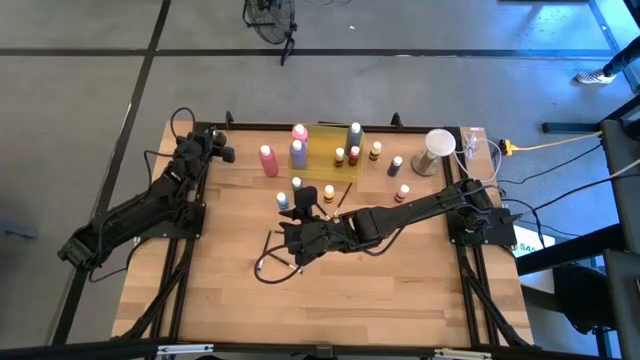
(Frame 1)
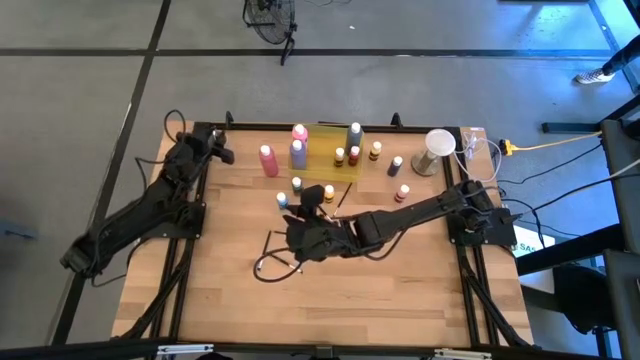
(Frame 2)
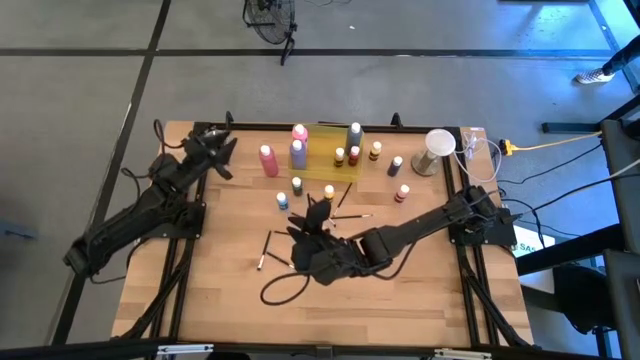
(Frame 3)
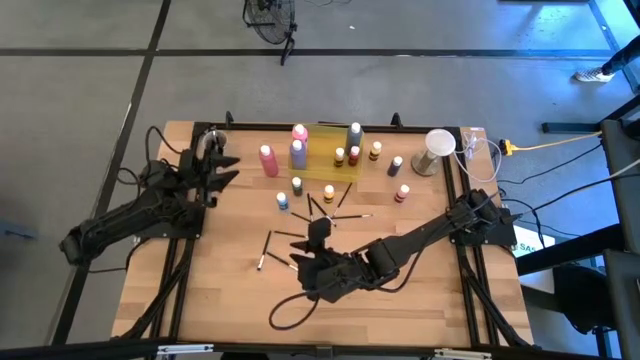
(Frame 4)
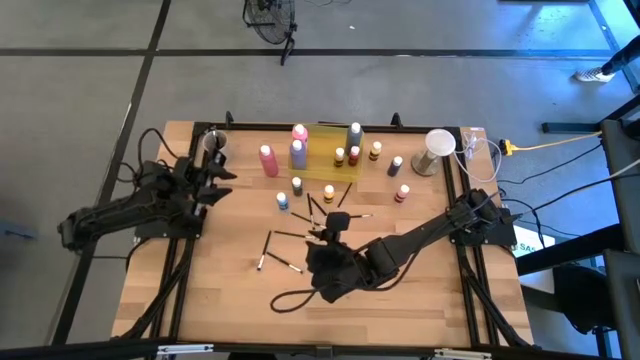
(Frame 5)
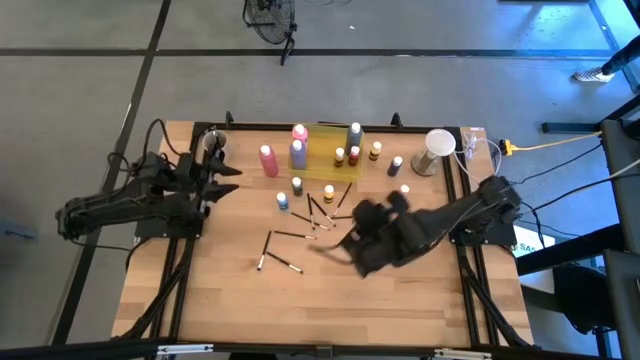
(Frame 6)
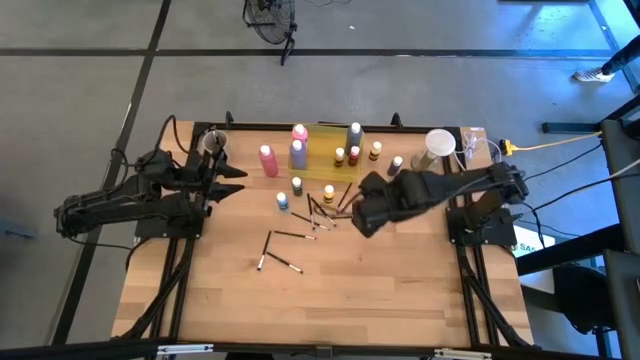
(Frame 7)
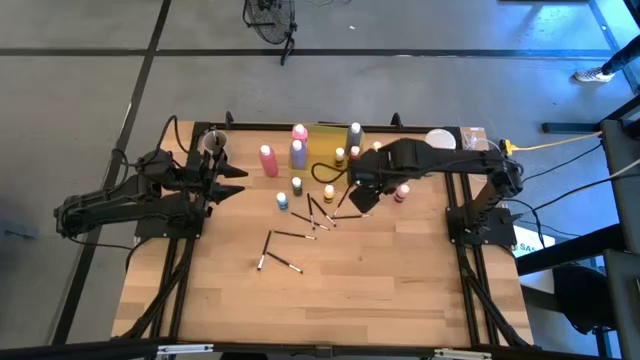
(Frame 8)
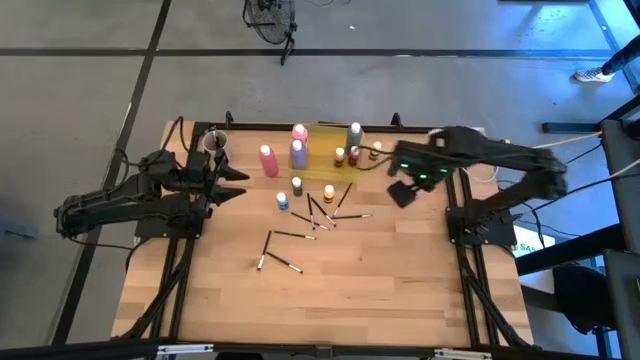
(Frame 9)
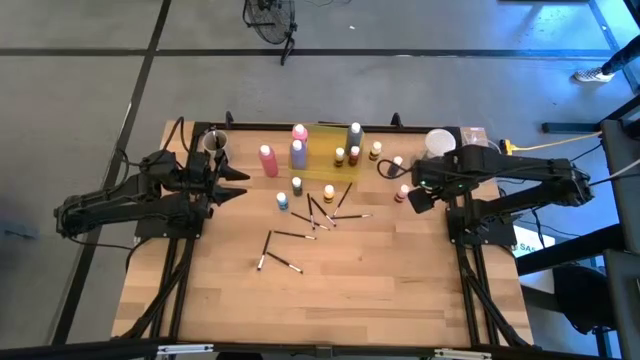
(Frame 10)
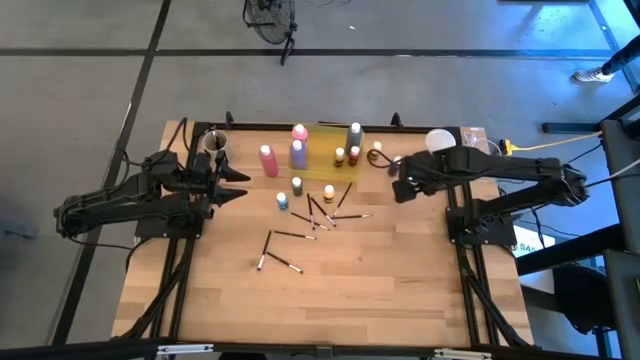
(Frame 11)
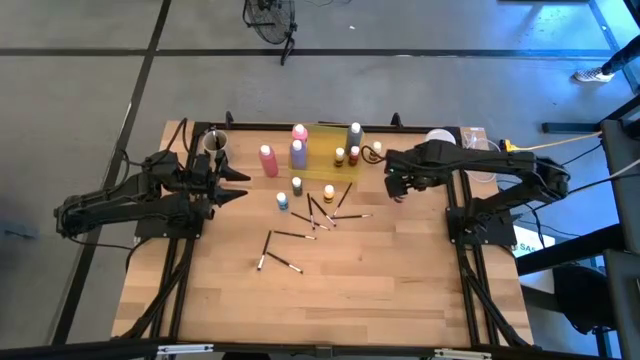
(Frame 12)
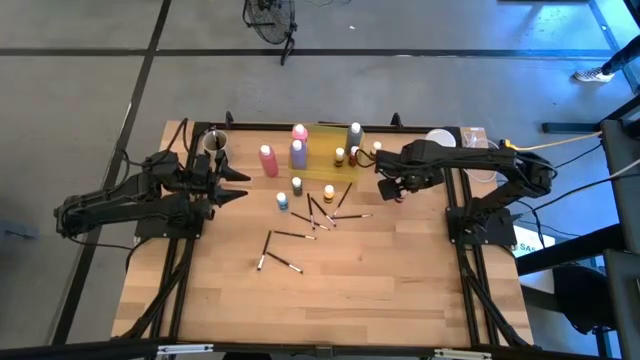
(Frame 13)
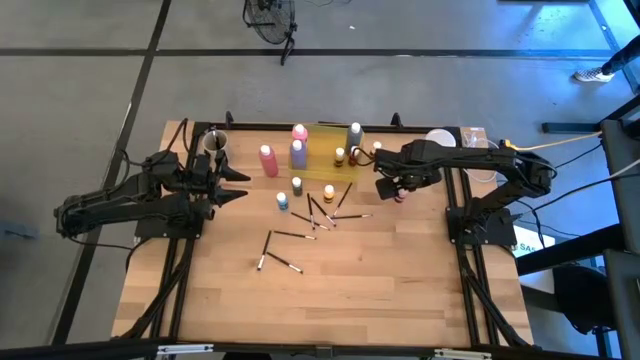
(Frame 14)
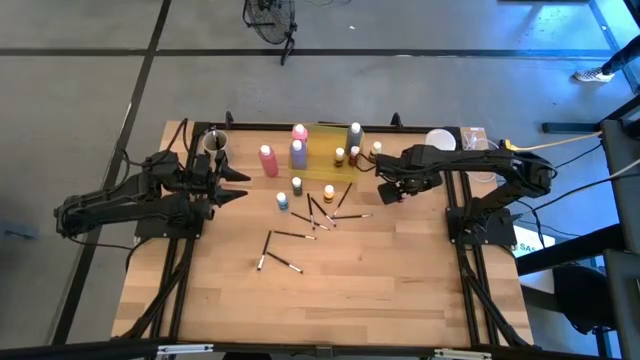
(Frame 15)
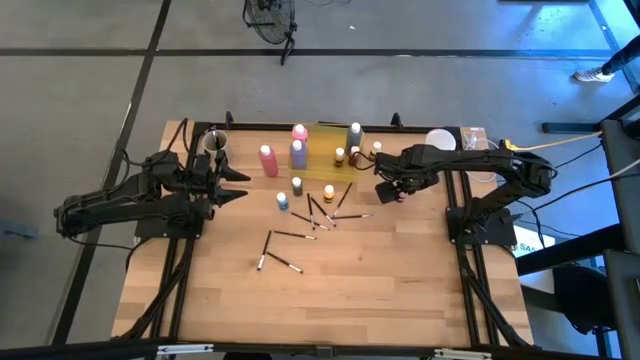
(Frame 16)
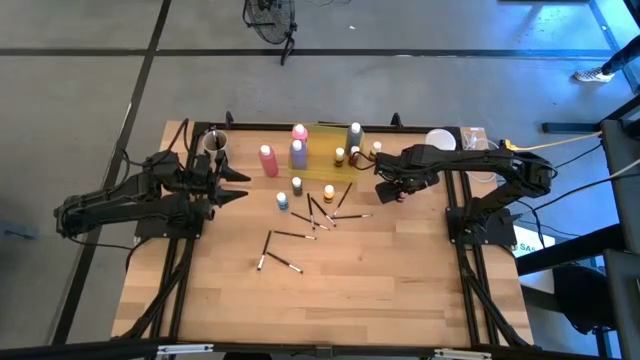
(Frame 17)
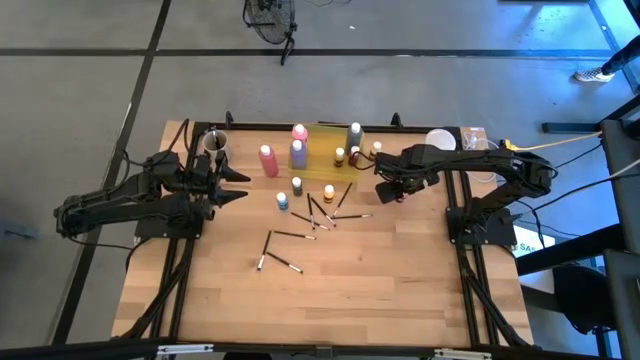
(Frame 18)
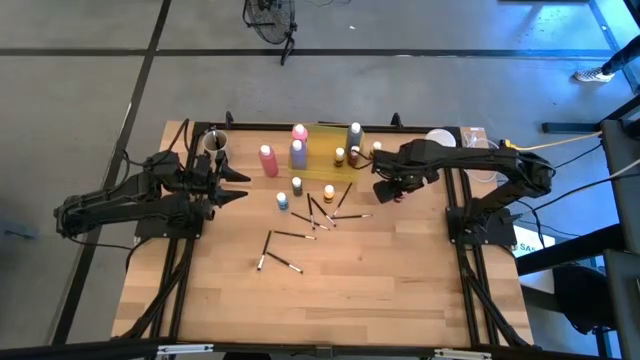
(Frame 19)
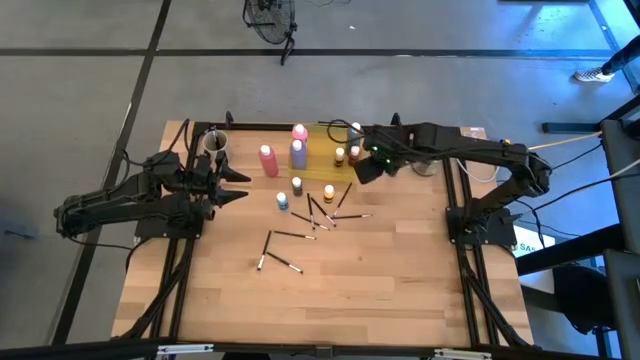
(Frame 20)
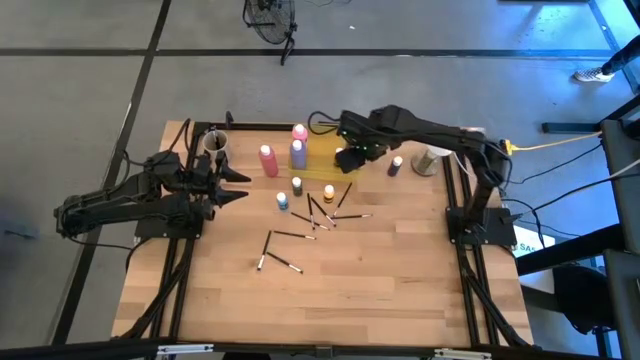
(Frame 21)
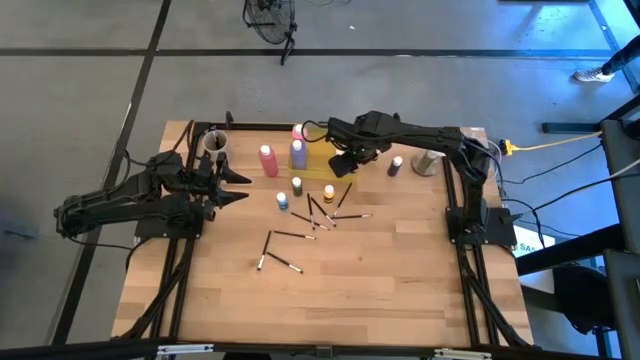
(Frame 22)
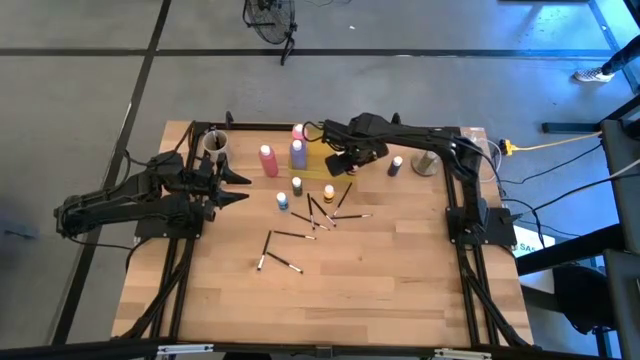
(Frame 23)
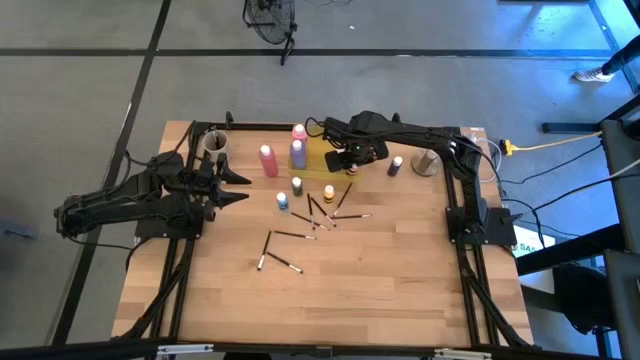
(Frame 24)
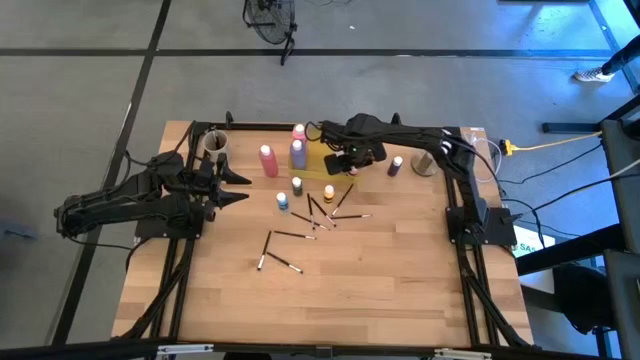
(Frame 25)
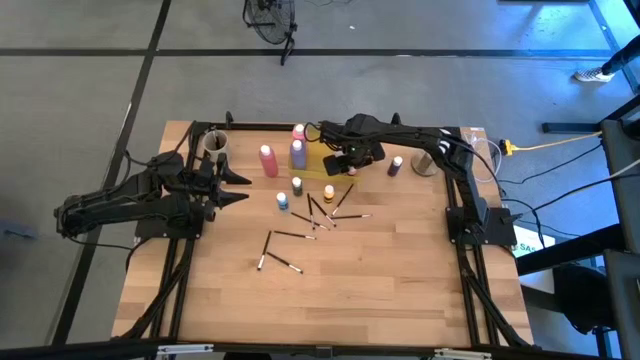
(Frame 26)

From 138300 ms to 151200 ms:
Task: Pick & Place Paint Supplies
Put the small pink paint bottle into the yellow bin

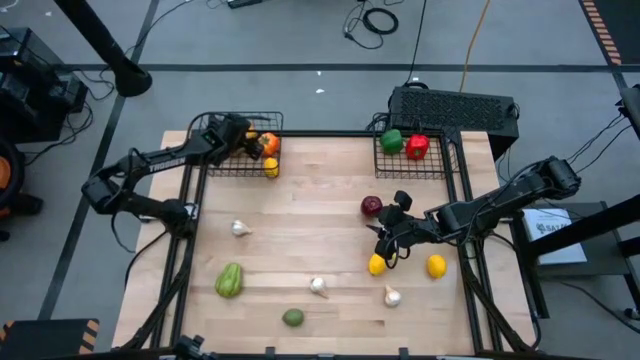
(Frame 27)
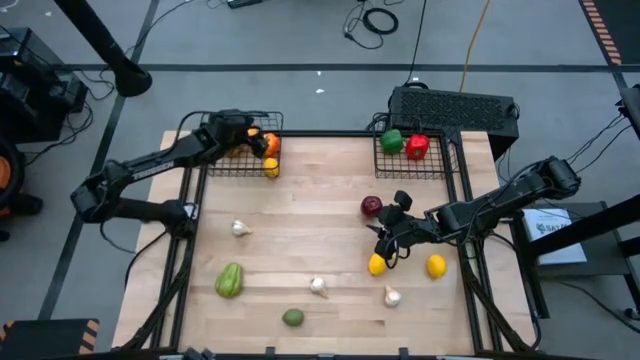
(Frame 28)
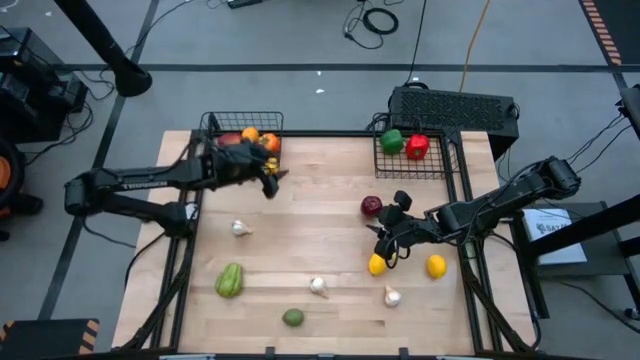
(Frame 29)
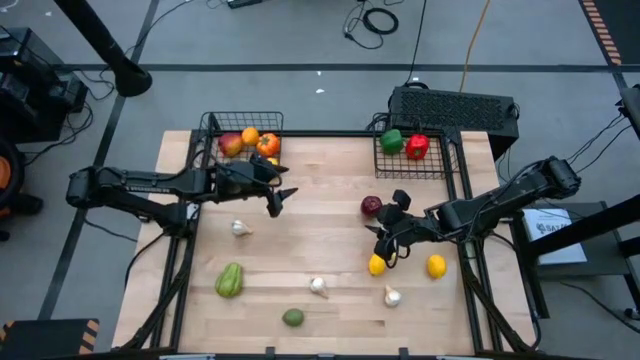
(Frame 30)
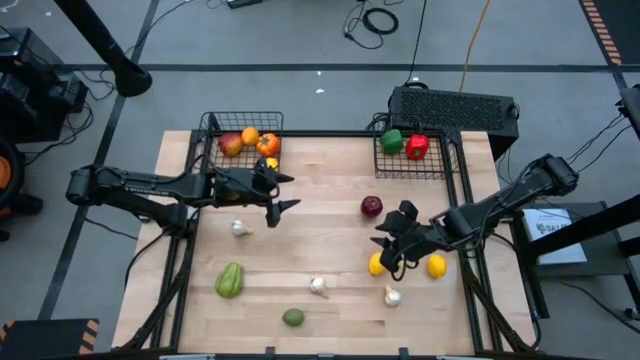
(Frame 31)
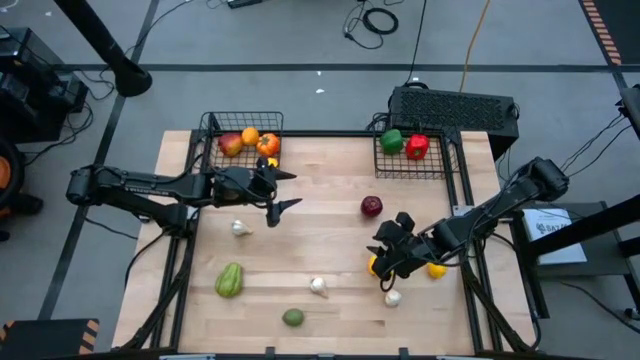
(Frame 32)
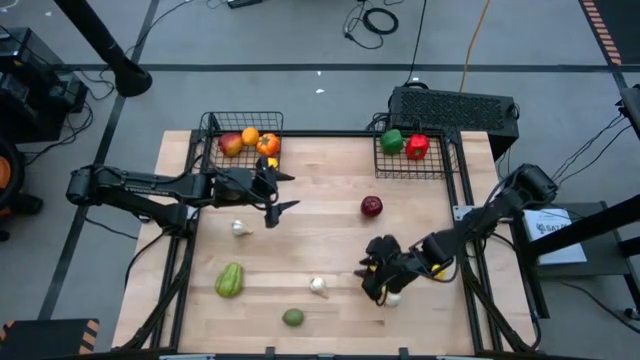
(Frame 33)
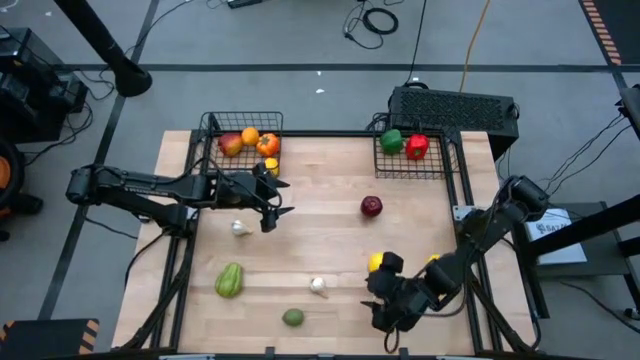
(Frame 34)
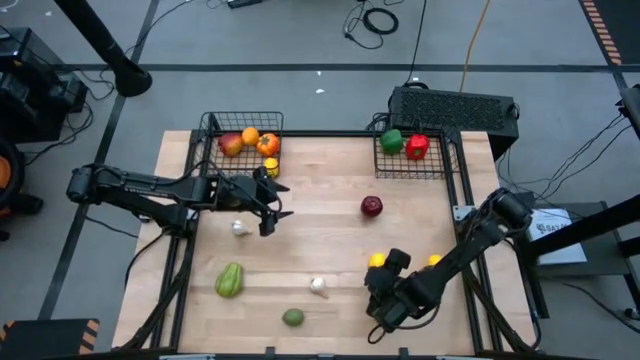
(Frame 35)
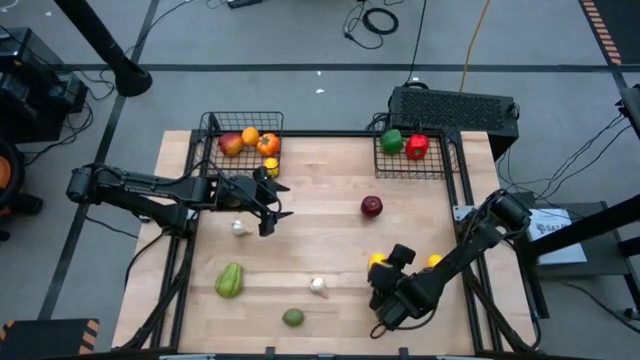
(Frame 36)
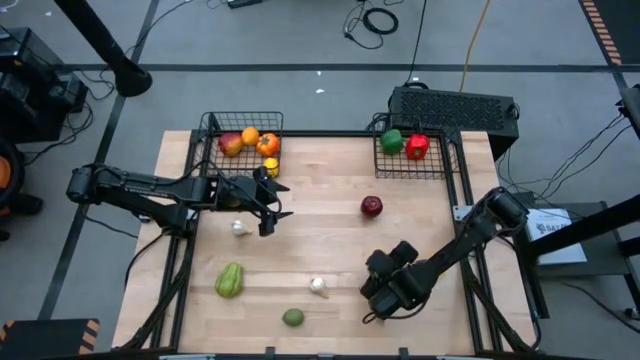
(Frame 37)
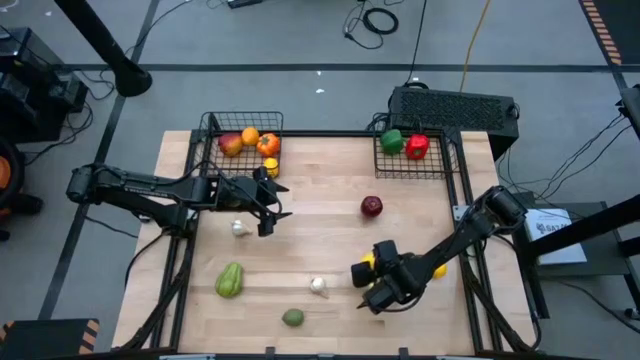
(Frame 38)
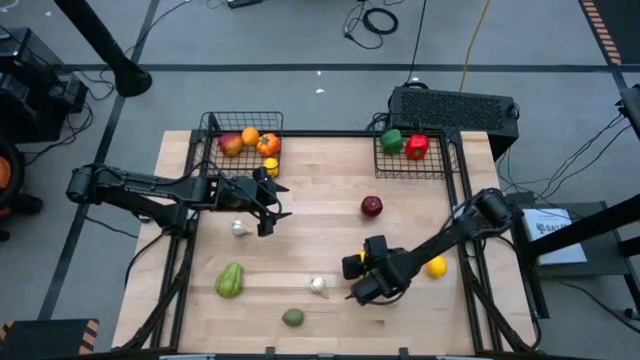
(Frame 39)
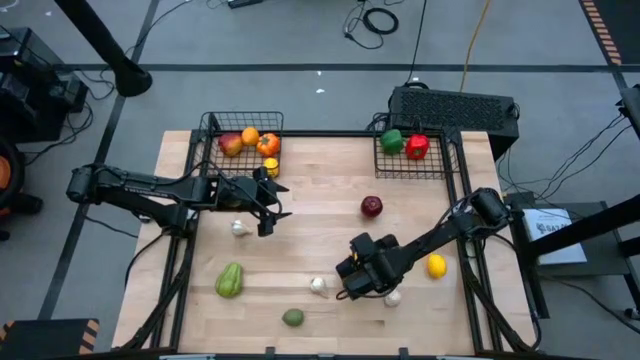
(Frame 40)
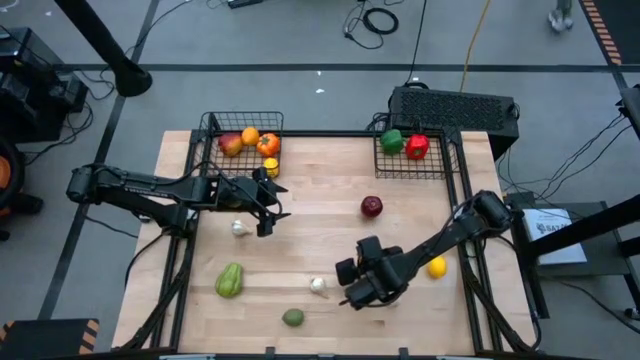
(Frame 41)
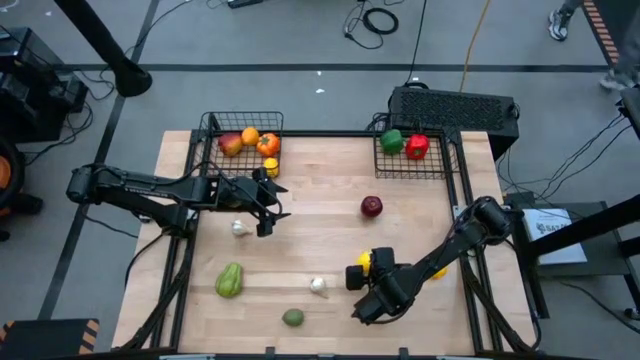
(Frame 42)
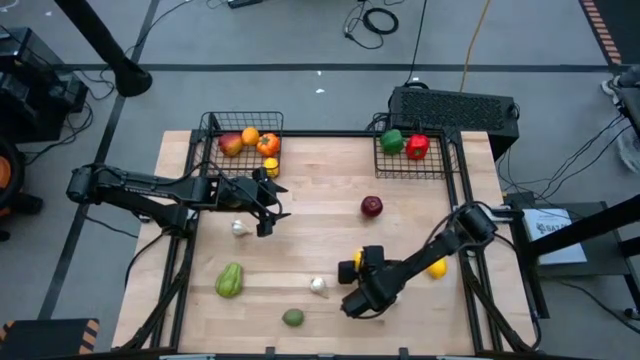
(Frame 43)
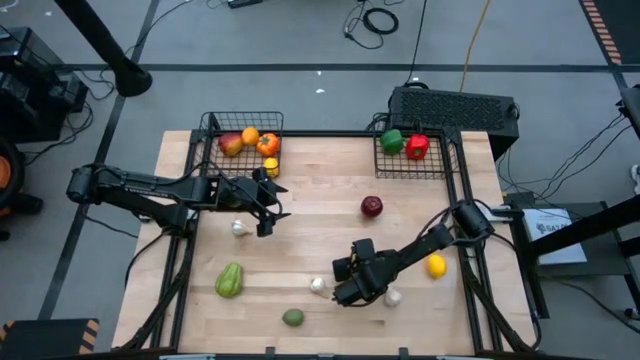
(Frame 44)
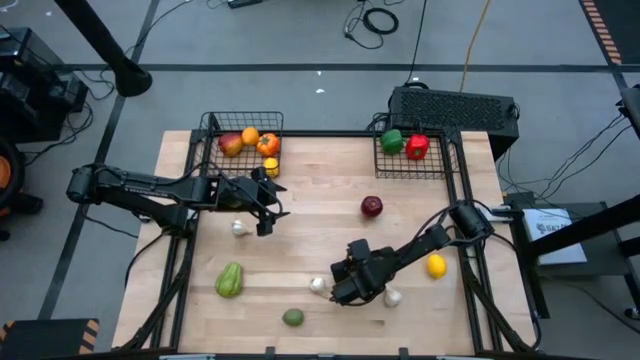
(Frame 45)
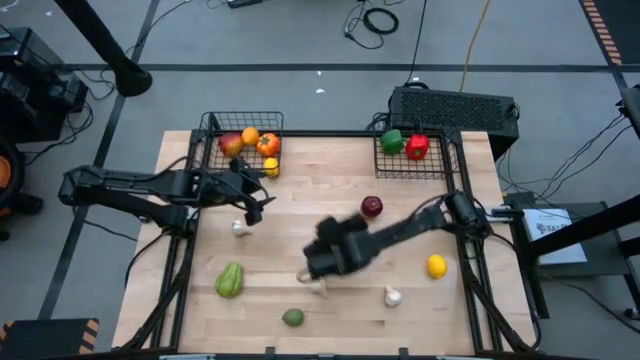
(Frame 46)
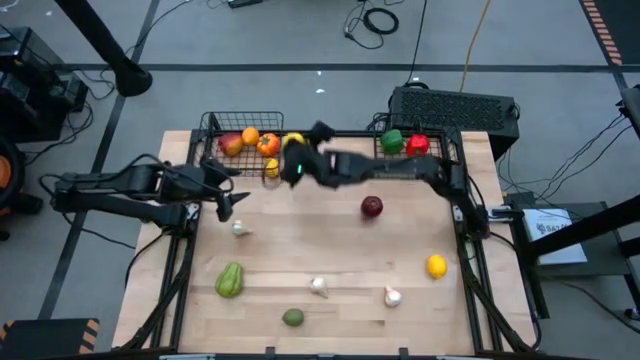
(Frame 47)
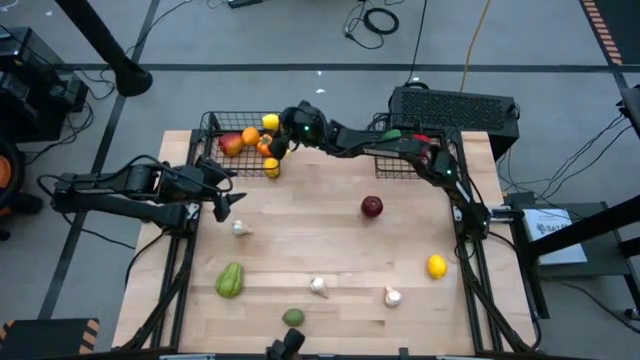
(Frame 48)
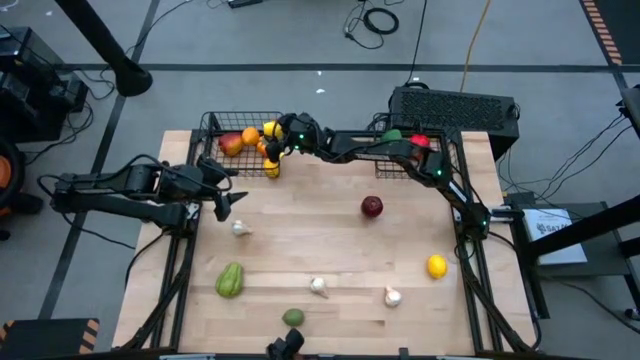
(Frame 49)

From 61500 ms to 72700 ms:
Task: Sort produce into baskets
Put the left yellow lemon in the left basket
